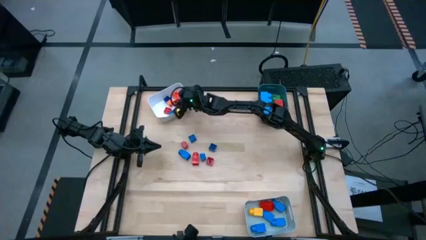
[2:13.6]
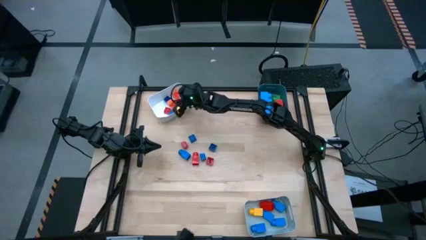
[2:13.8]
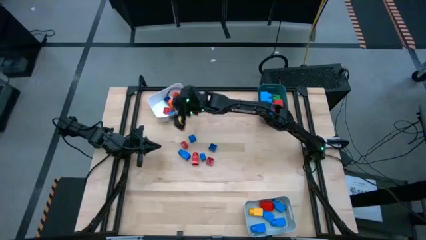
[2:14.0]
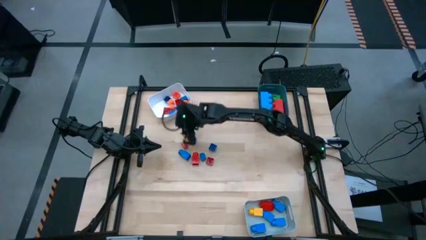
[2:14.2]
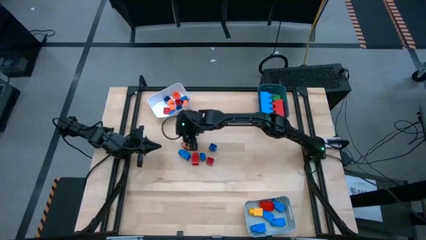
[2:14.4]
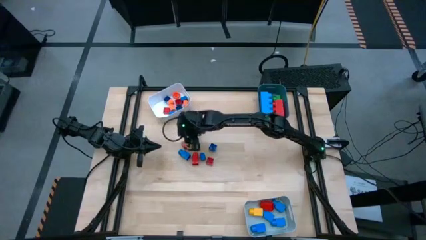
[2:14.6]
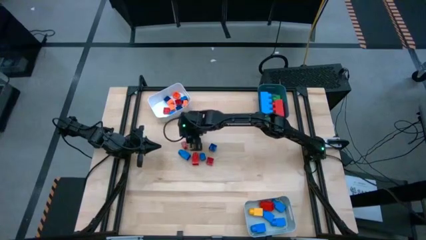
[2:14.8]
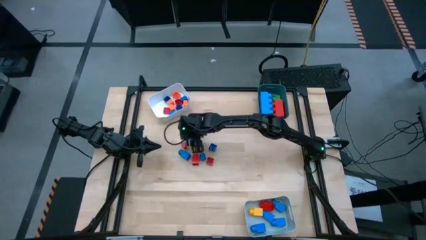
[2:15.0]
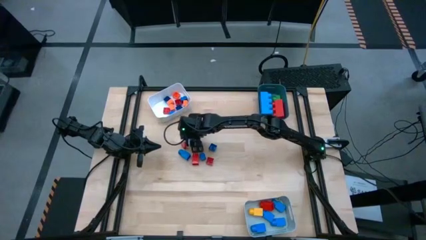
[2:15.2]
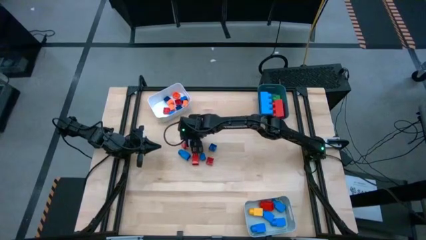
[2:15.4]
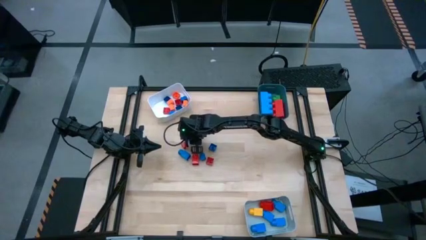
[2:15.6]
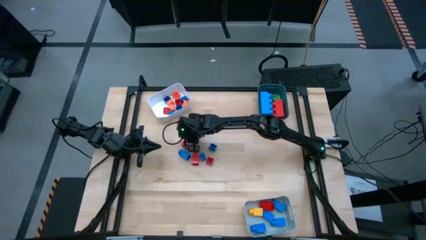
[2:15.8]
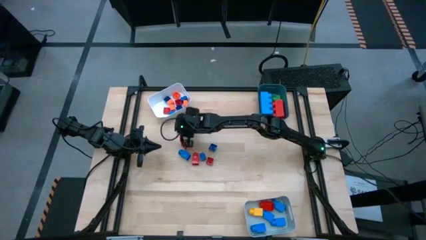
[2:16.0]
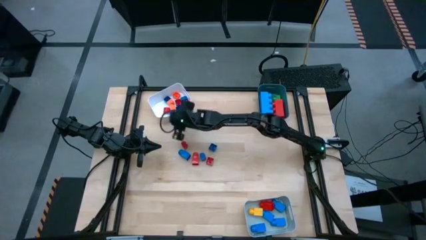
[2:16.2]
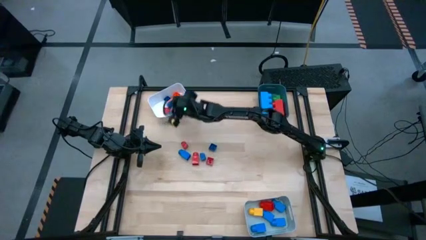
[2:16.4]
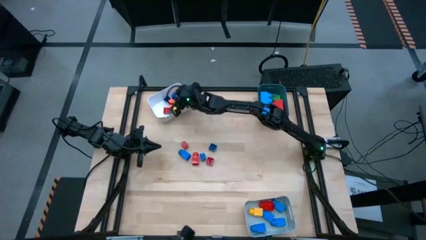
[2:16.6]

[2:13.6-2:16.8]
Task: Sort blocks by size
Put the small 4 stud blue game piece into the white bin

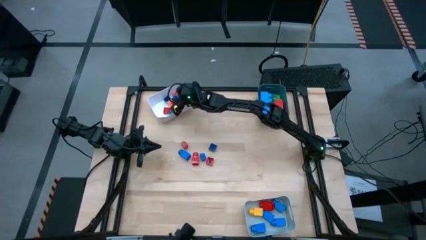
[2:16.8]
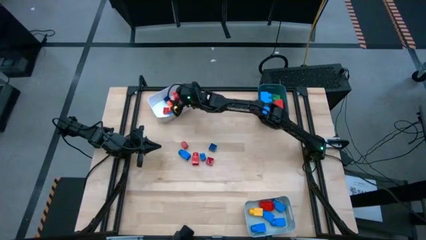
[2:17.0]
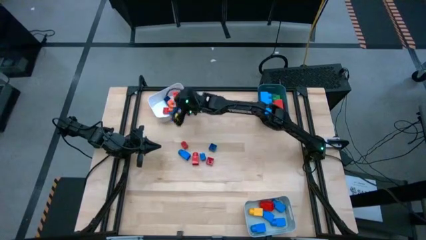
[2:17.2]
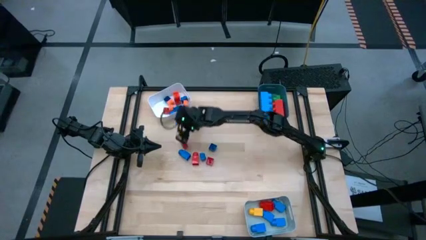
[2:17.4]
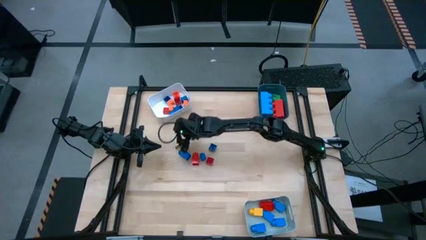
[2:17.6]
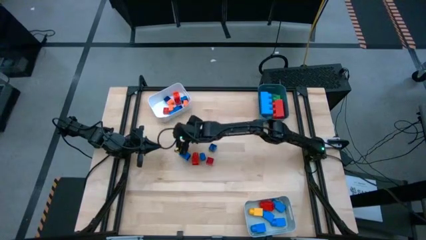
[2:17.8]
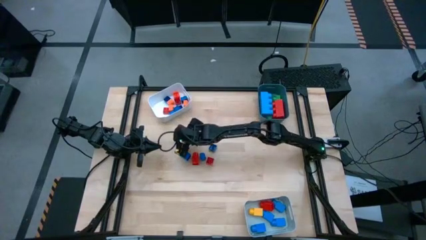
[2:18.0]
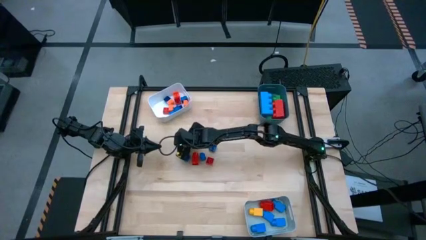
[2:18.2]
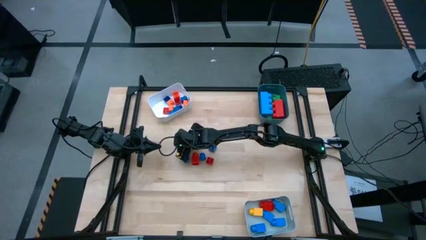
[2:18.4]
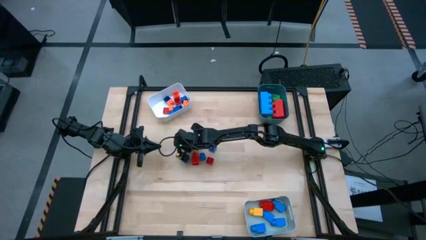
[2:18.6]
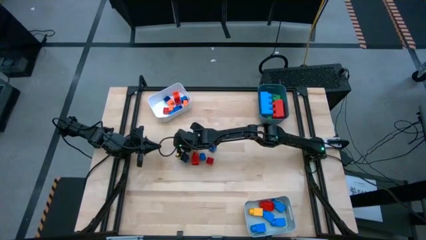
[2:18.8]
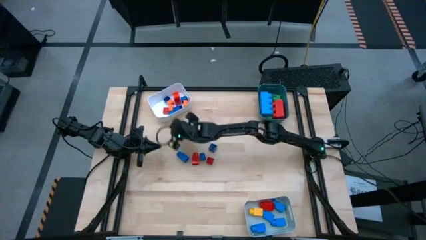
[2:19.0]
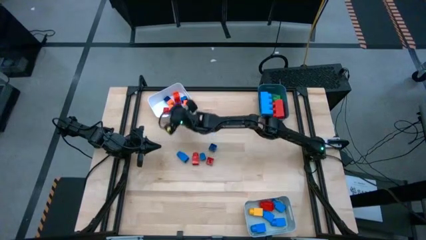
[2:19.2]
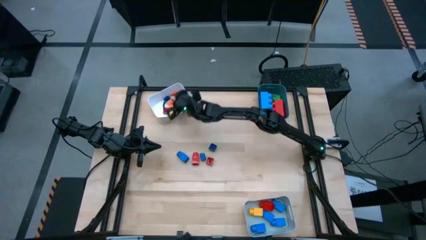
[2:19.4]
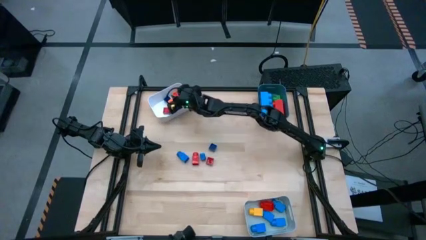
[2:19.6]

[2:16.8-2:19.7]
Put the small 4 stud red game piece into the white bin

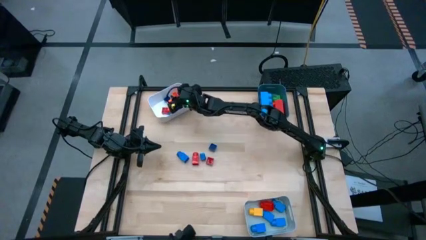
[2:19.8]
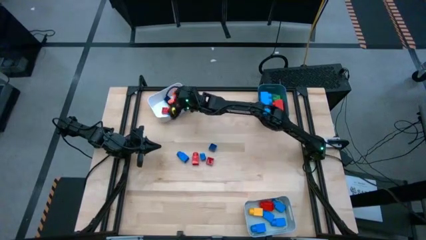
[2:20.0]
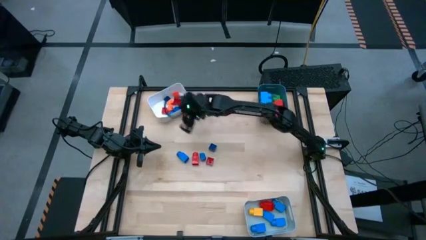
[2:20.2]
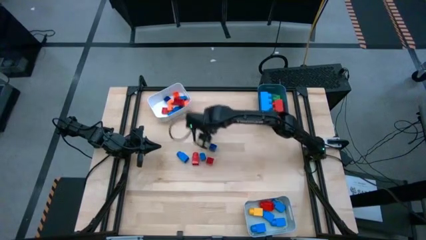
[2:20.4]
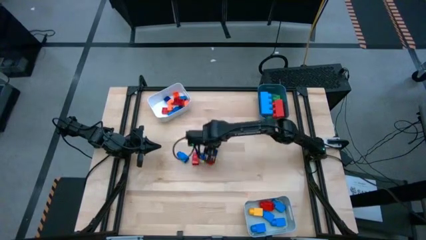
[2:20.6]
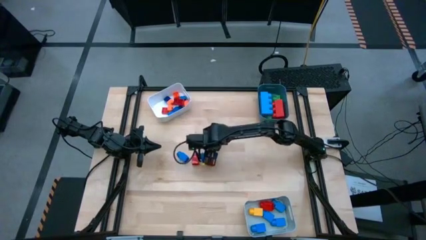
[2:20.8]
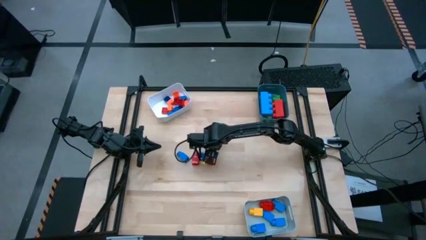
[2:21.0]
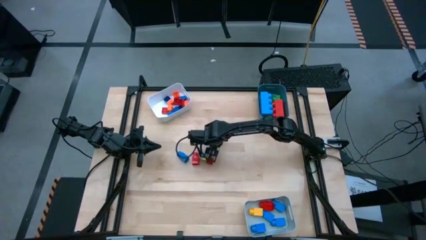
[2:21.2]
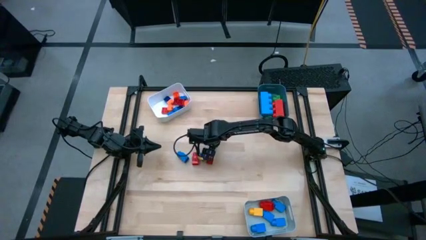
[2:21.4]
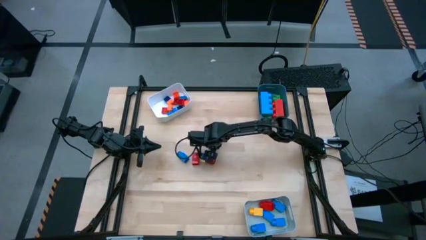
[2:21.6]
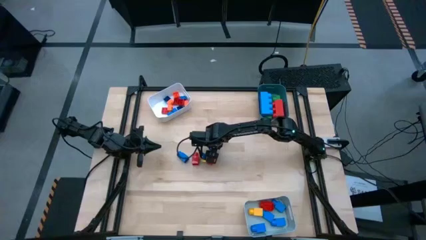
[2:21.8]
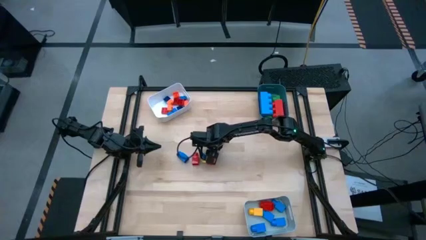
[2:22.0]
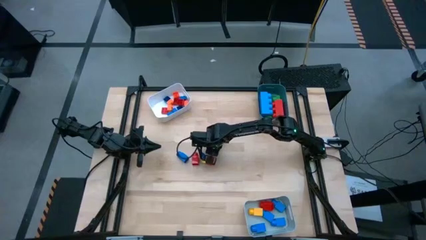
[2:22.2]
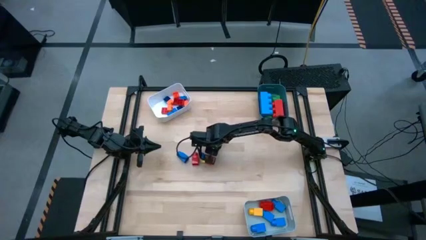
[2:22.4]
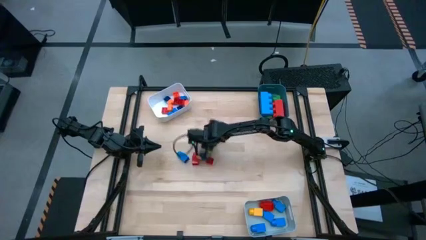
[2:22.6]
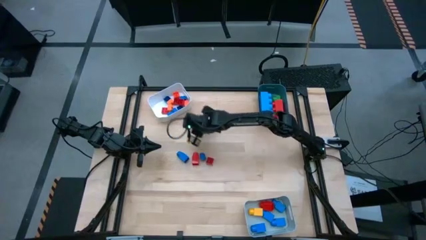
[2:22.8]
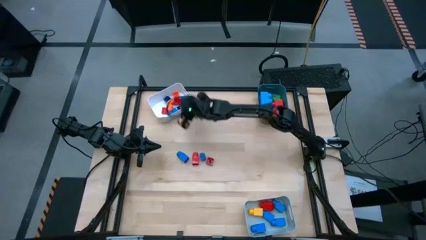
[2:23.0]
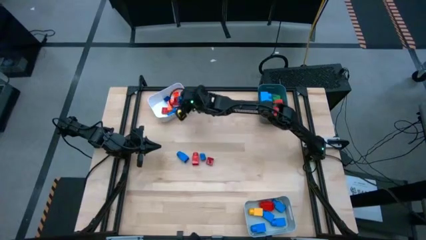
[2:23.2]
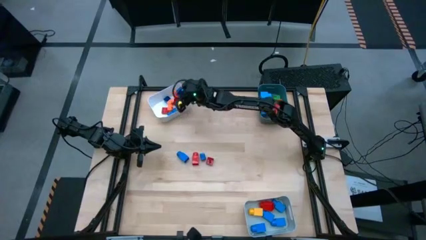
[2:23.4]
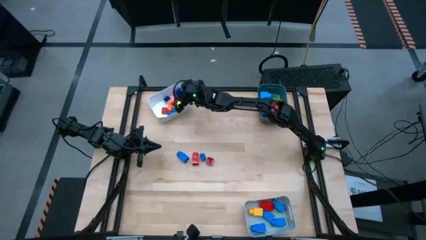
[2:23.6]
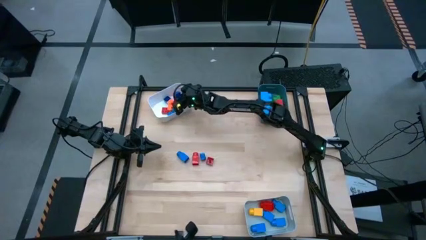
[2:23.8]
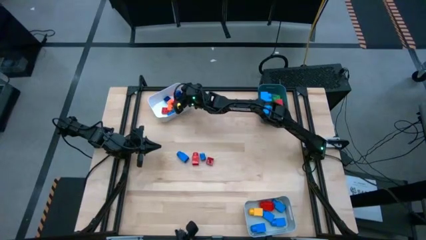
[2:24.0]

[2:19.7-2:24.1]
Put the small 4 stud blue game piece into the white bin

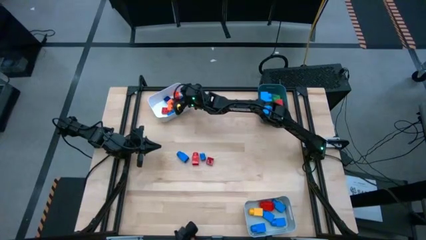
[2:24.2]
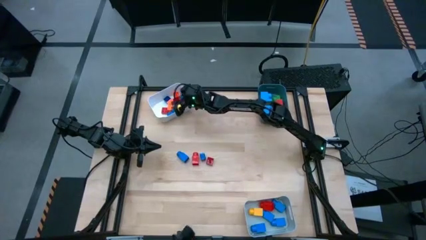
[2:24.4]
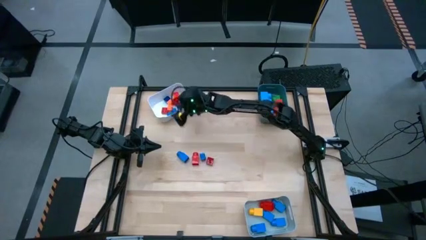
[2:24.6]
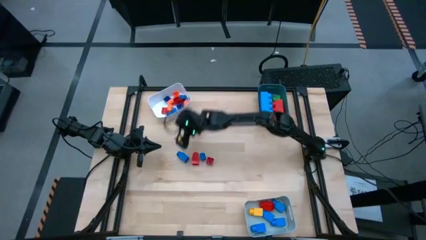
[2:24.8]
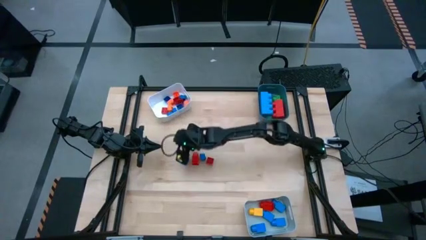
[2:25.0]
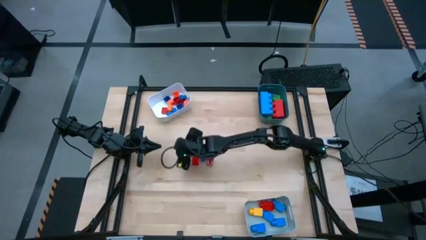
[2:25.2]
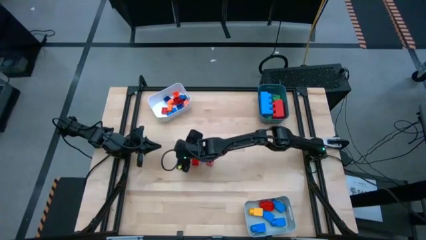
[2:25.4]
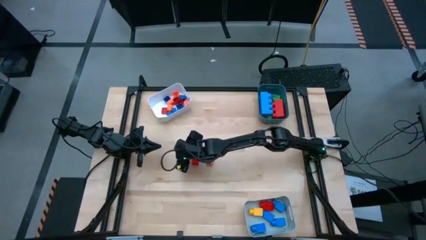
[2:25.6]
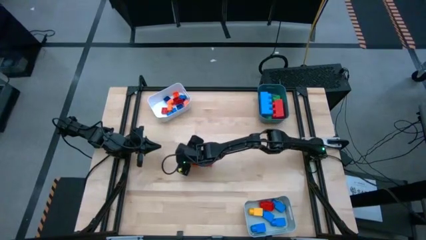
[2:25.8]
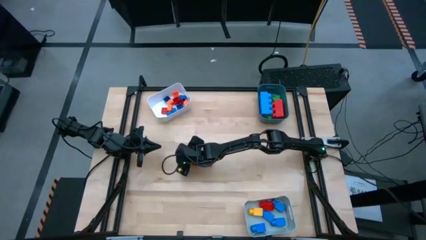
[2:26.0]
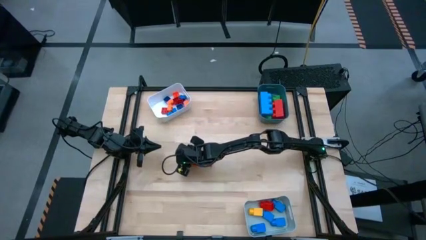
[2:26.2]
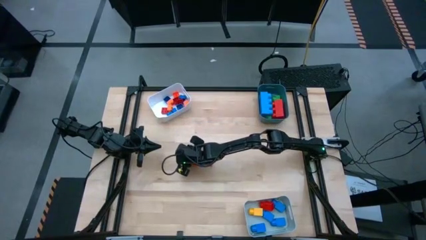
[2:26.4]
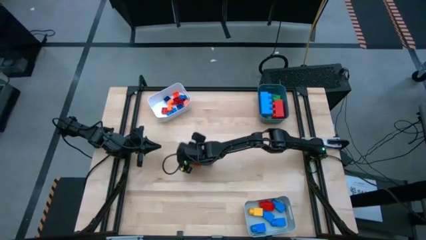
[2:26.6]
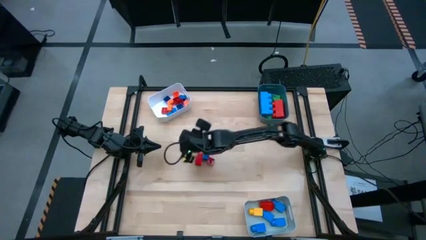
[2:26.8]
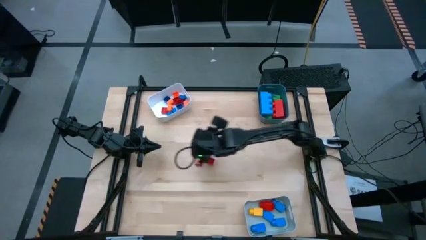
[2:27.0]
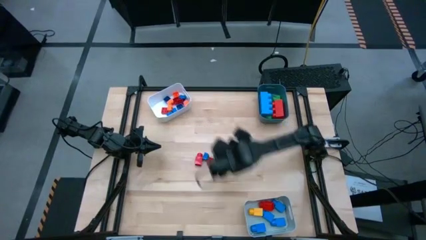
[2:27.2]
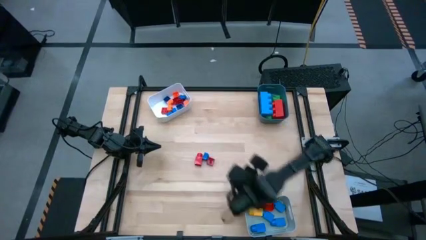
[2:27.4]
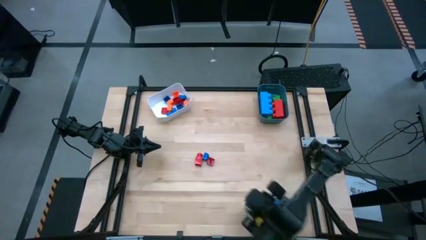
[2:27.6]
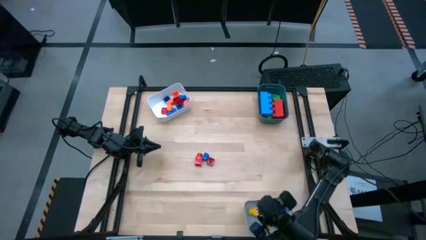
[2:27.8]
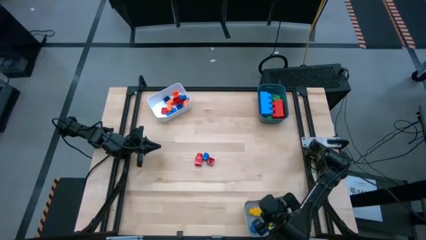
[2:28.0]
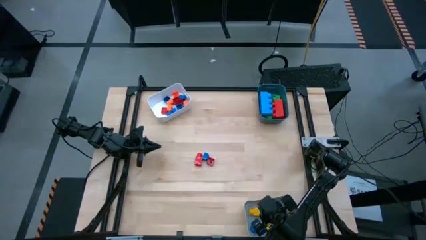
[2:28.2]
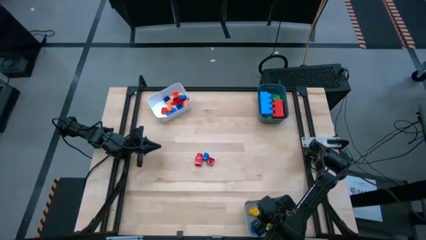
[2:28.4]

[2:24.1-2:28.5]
Put the 1 stud blue game piece into the gray bin

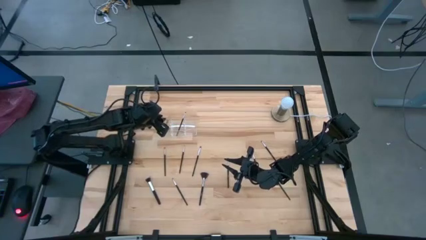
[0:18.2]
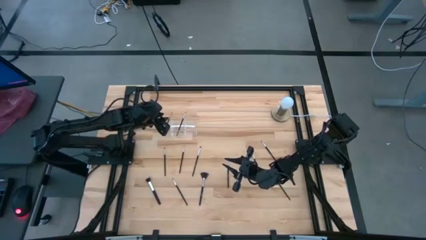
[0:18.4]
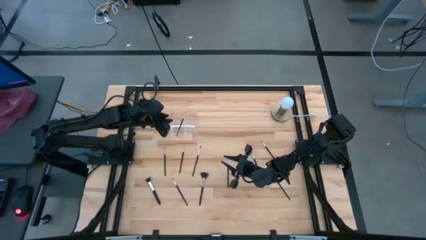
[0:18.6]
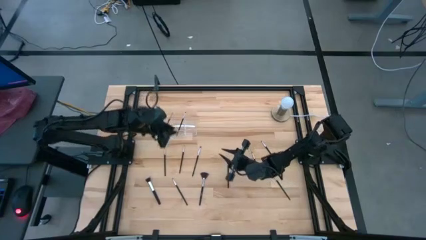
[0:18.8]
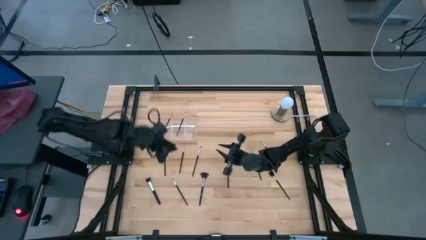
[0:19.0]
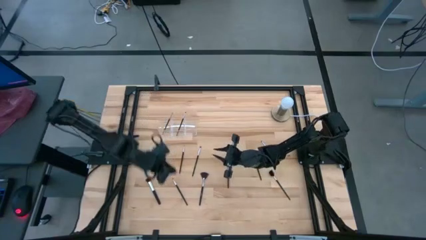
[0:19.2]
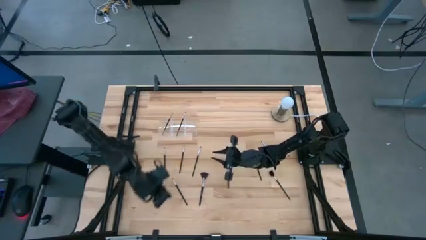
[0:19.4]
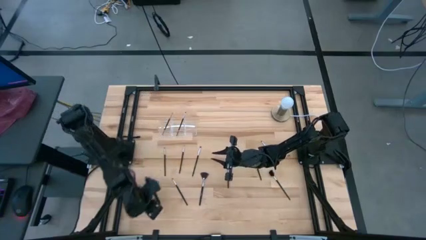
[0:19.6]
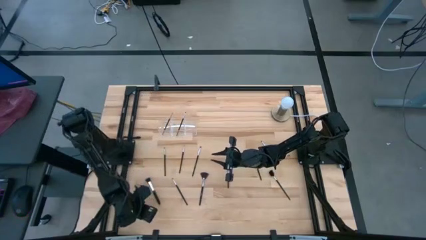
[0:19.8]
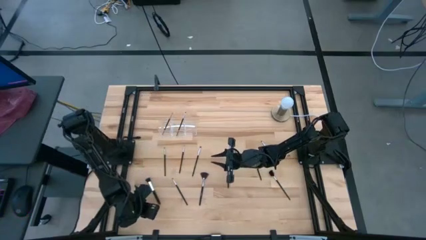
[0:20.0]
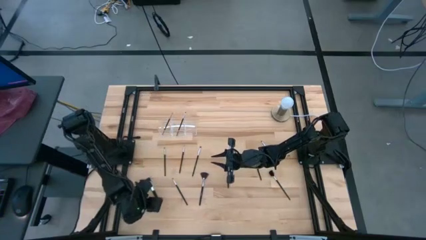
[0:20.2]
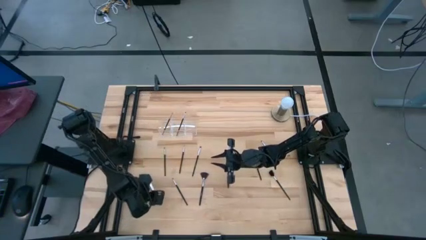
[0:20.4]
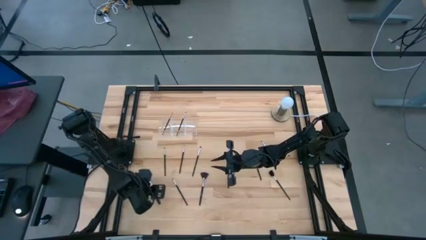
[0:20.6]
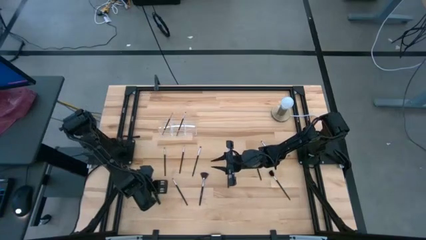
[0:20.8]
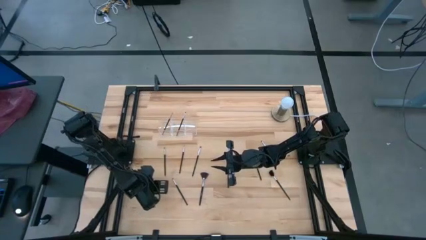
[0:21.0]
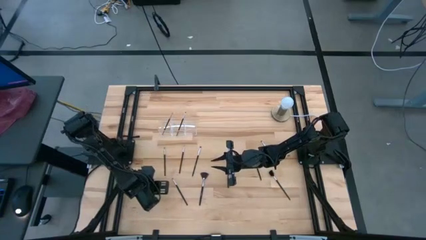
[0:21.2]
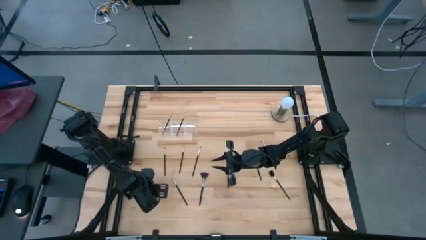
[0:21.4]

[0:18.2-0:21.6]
Task: Pick & Place Makeup Brushes
Put the black powder brush into the transparent organizer
